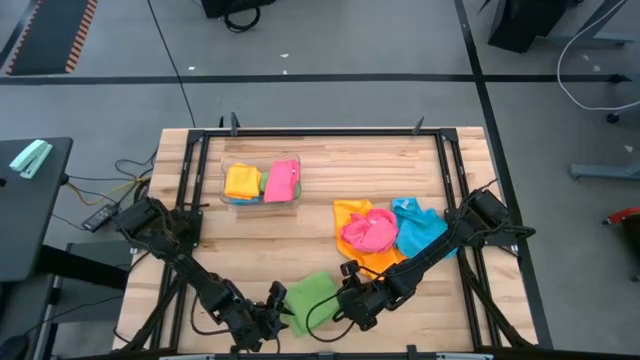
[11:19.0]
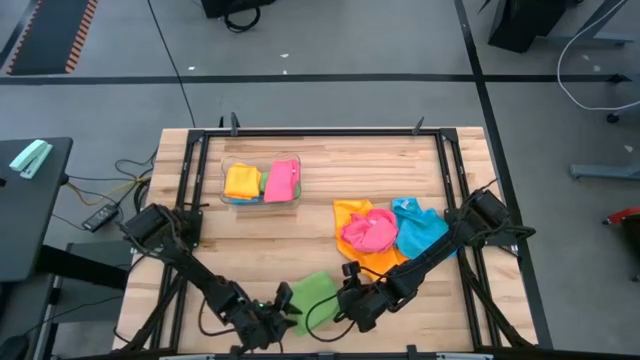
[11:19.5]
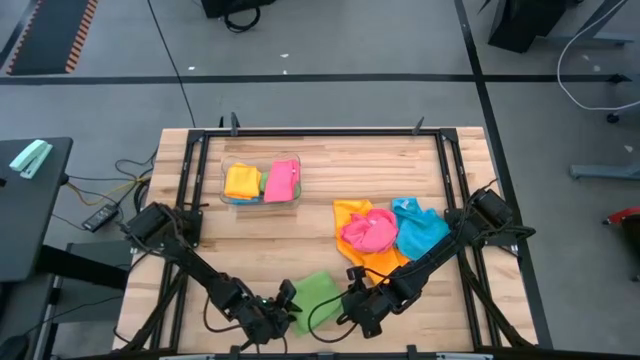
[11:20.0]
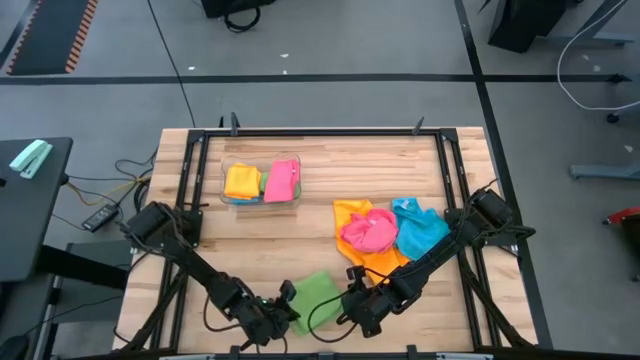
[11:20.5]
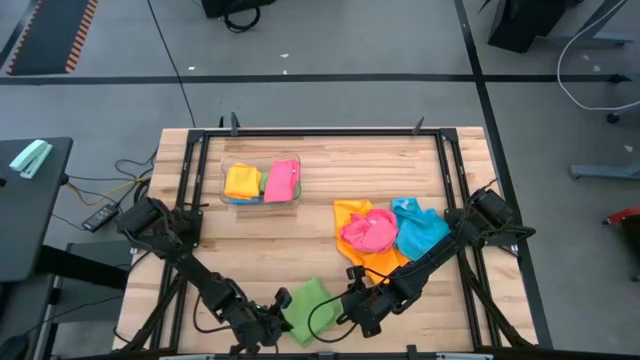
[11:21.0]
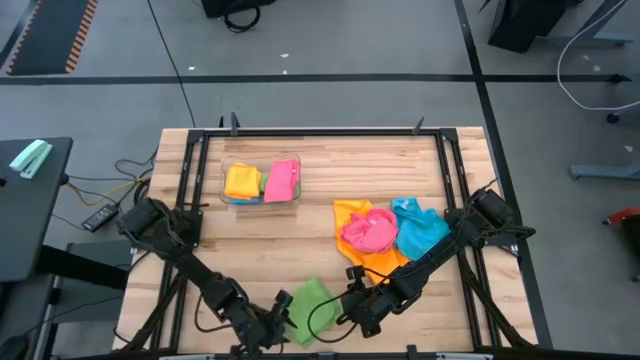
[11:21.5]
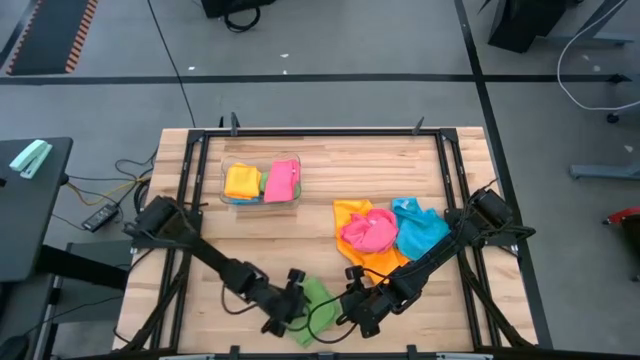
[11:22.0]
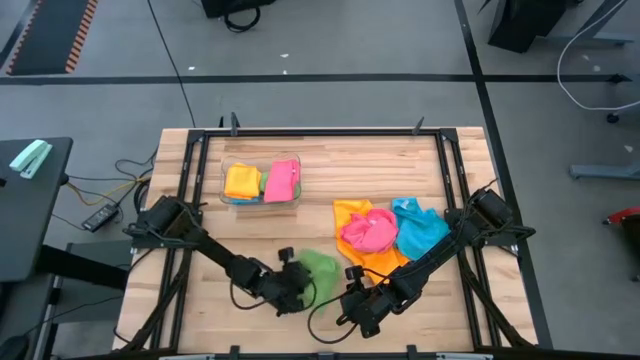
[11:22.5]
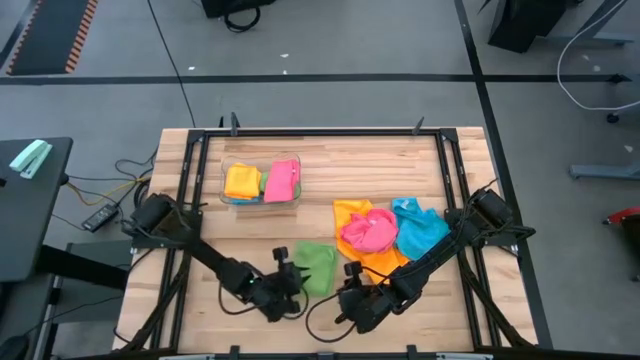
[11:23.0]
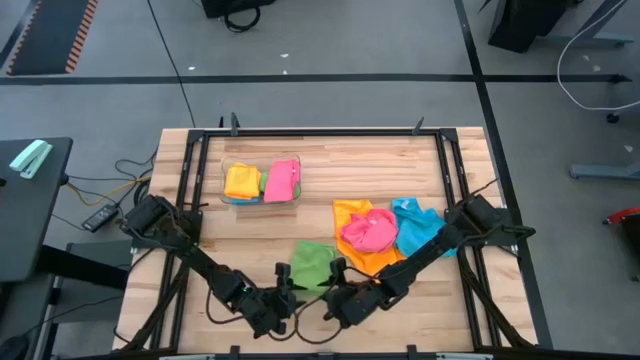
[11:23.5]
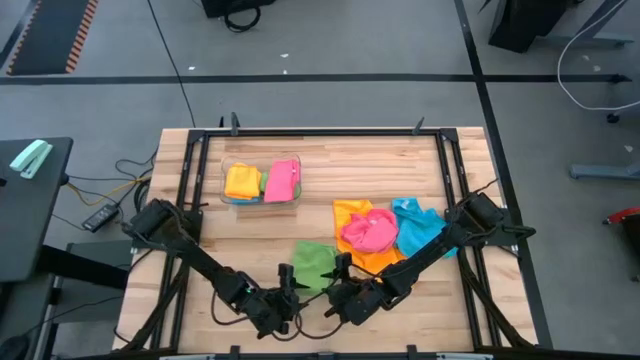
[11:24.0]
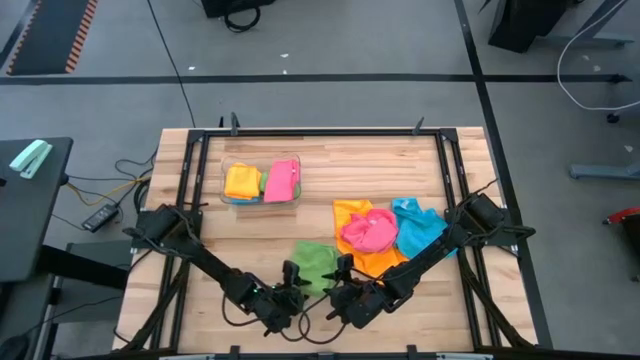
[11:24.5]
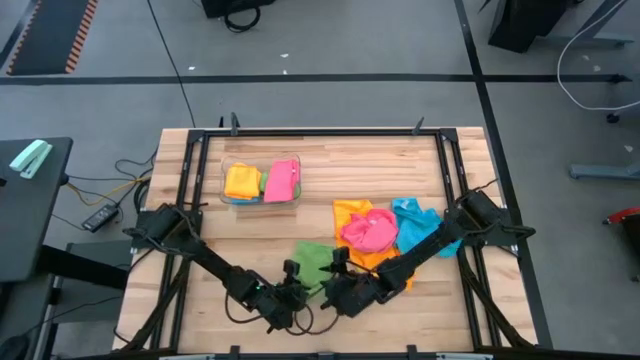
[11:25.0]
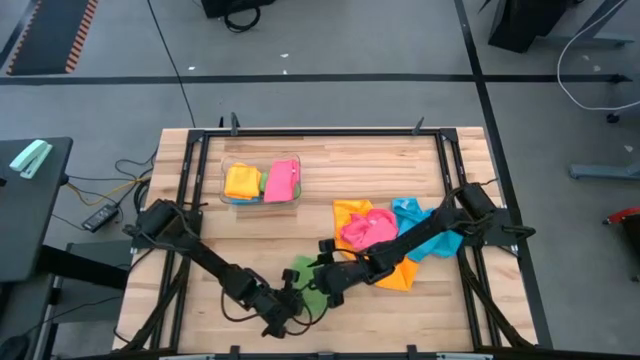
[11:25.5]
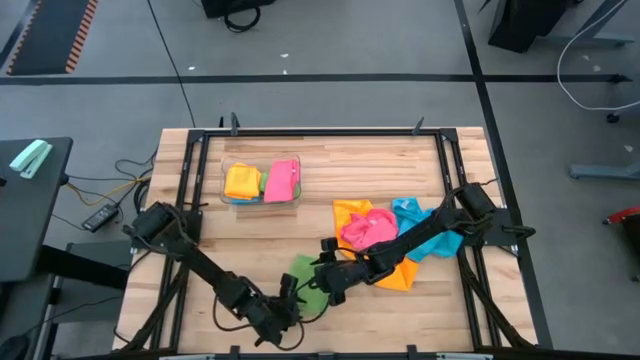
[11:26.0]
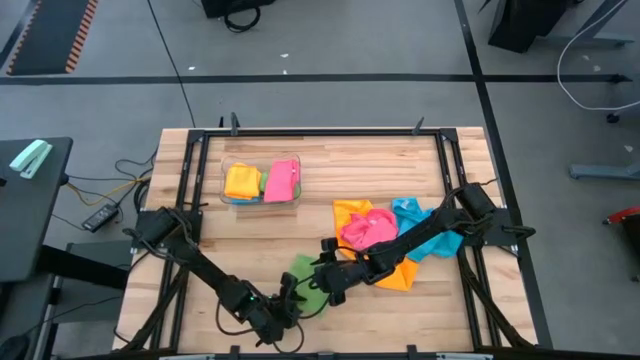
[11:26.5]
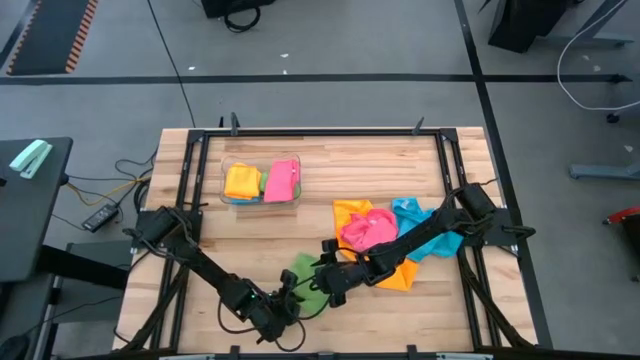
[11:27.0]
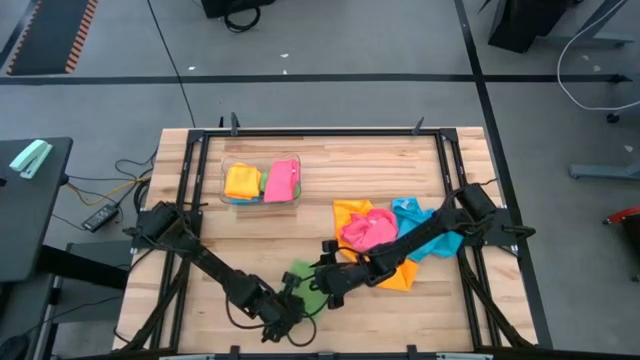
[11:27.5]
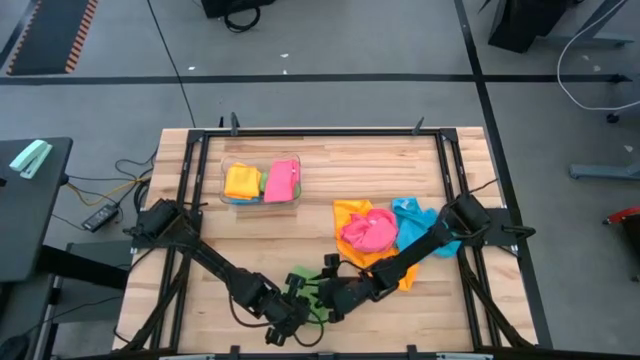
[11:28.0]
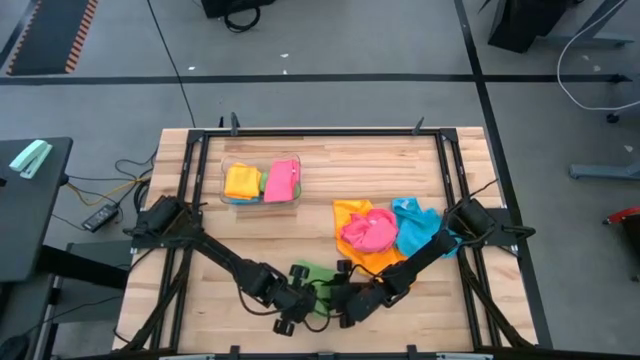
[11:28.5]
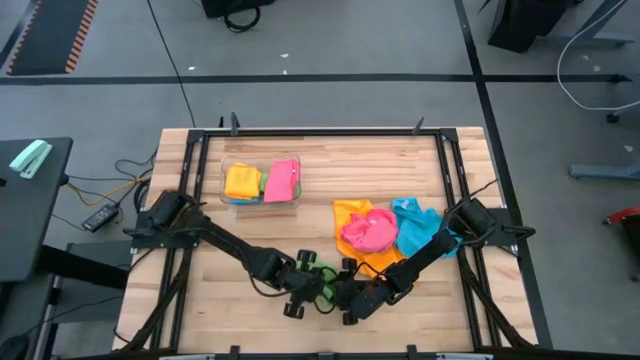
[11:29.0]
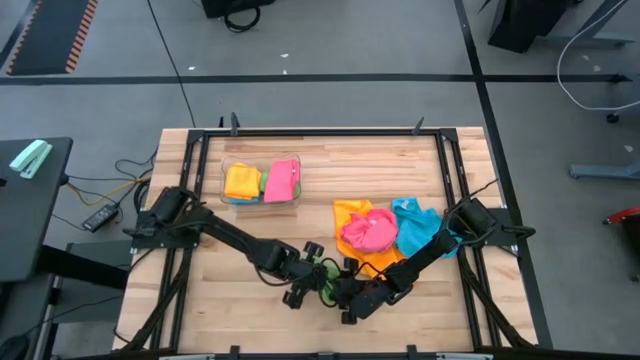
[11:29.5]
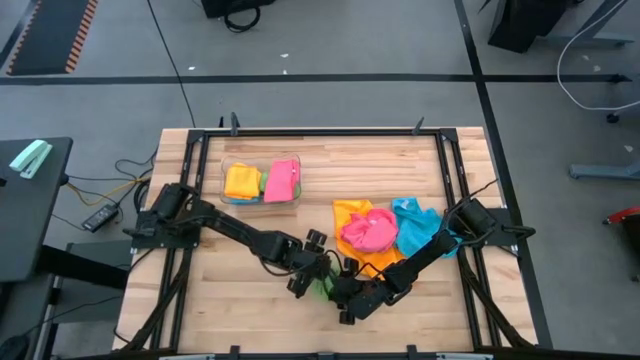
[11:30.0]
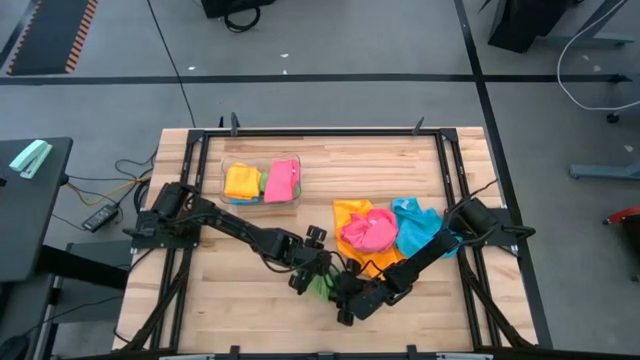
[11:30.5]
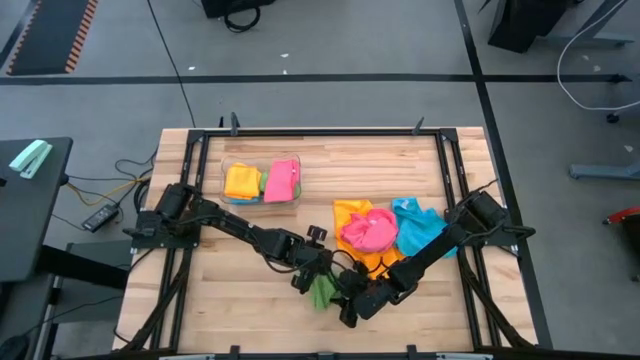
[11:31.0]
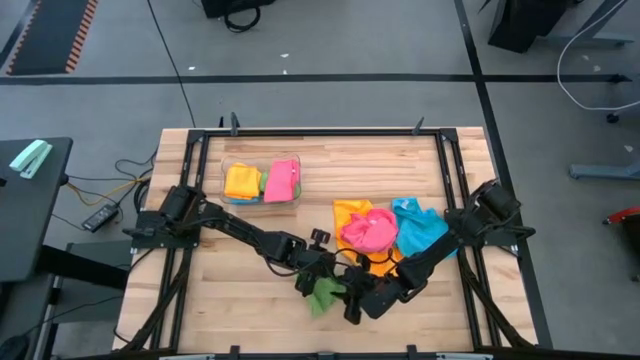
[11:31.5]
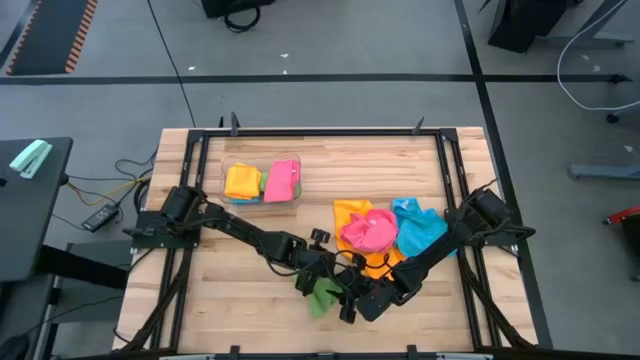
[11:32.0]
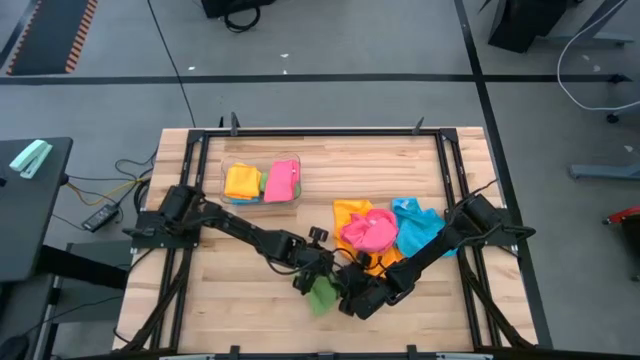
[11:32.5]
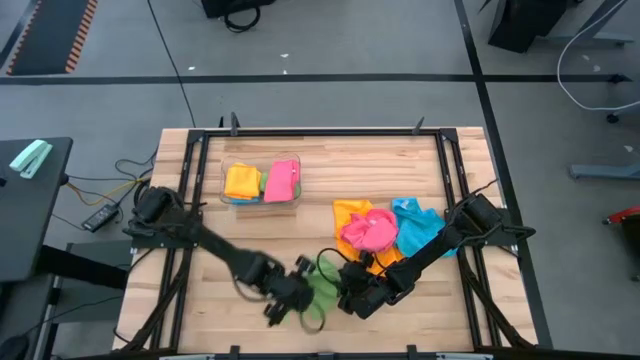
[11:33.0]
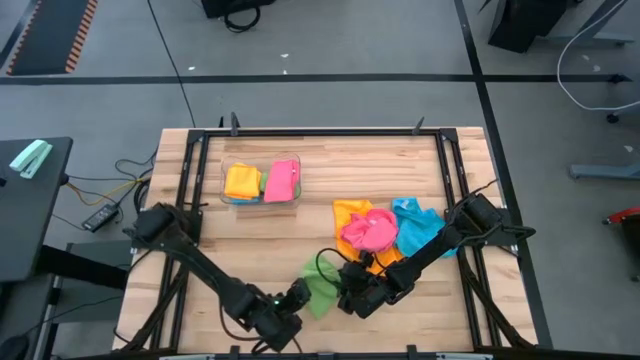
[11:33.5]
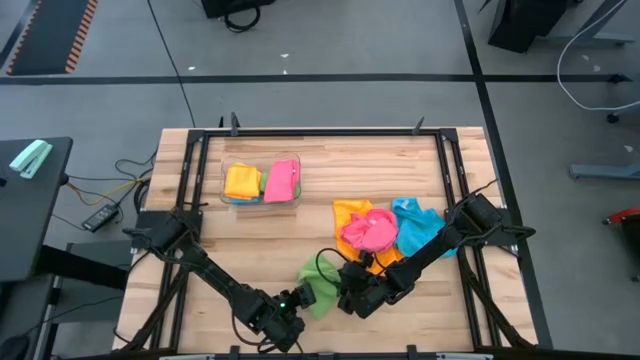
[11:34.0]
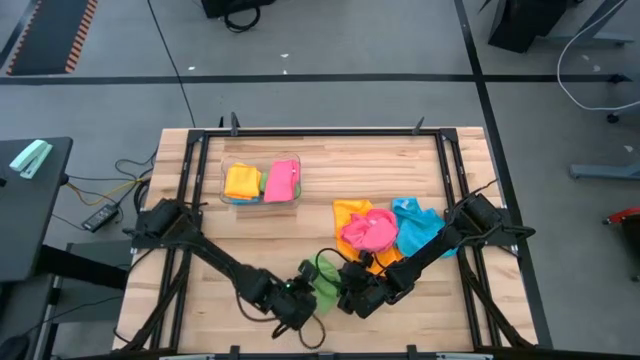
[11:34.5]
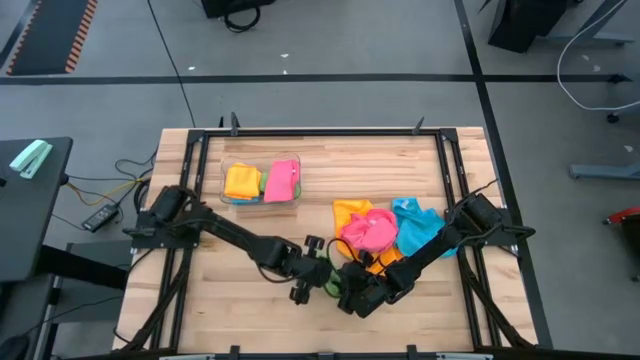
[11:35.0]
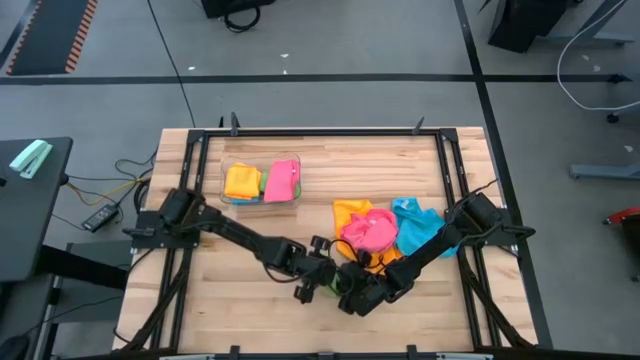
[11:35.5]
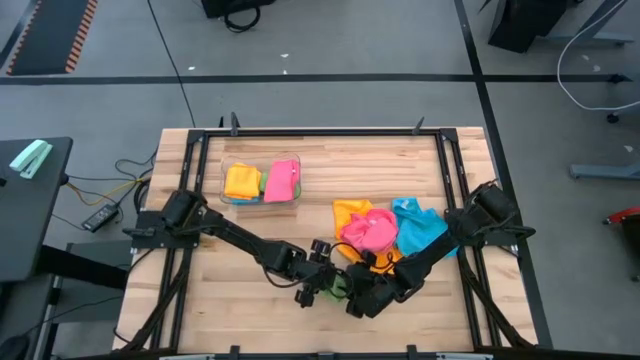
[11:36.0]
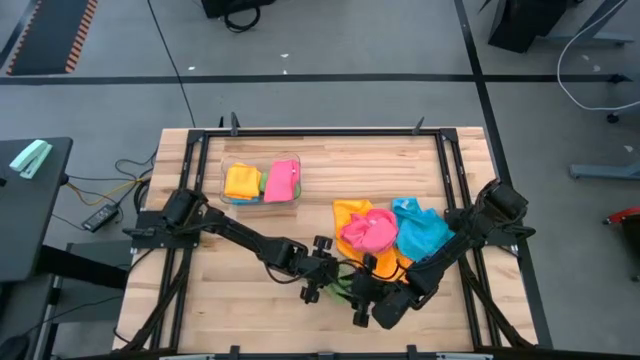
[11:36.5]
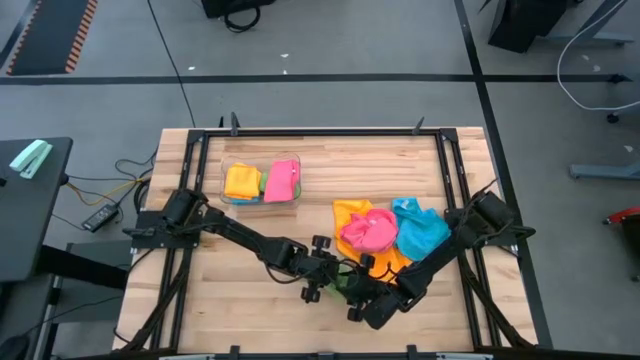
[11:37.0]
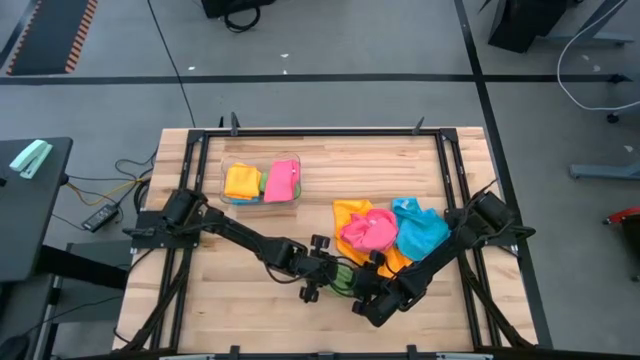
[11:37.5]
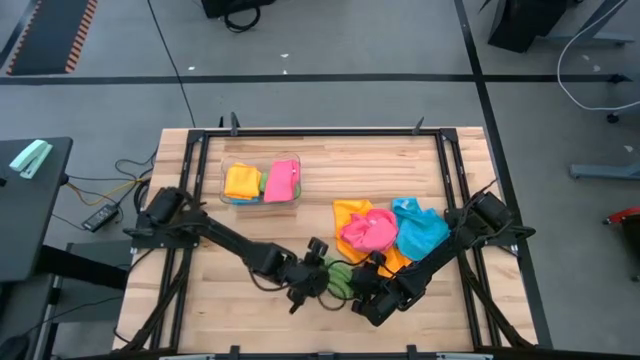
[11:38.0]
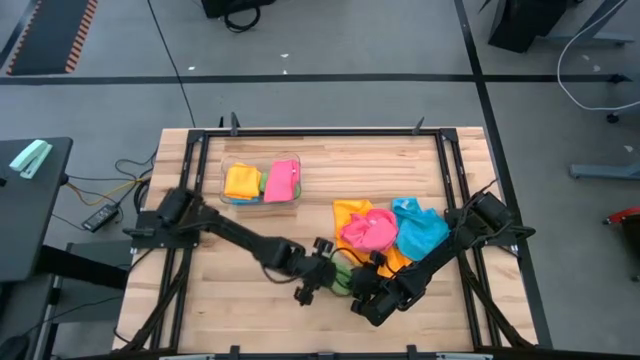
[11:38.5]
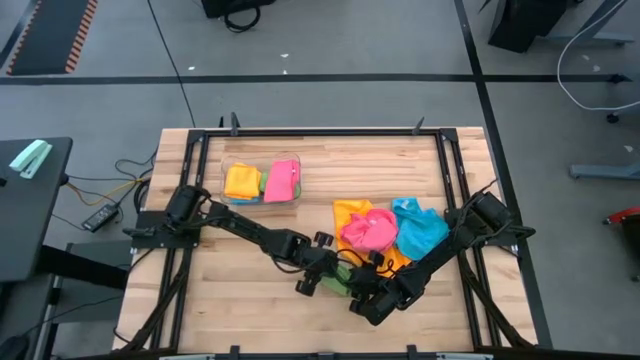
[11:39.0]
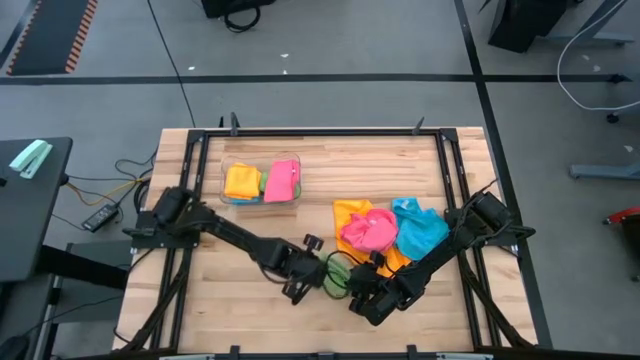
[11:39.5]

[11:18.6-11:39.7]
Task: Fold microfiber towels
Fold the green microfiber towel
